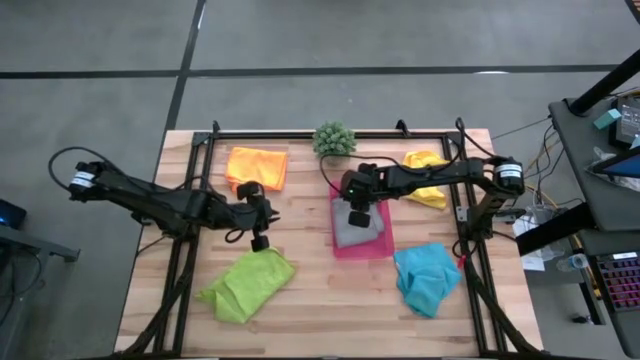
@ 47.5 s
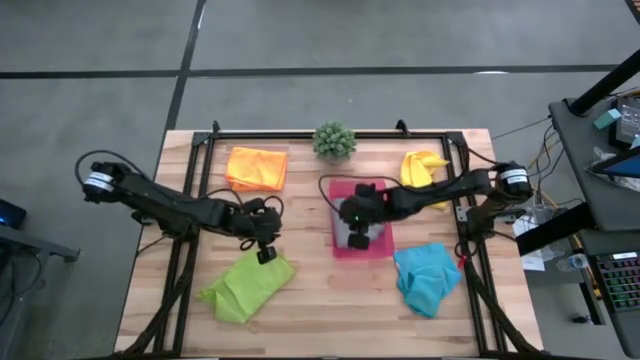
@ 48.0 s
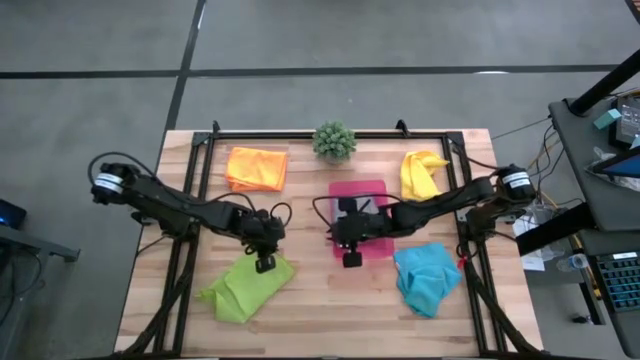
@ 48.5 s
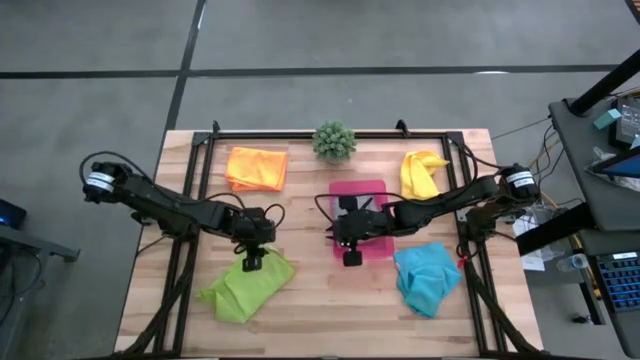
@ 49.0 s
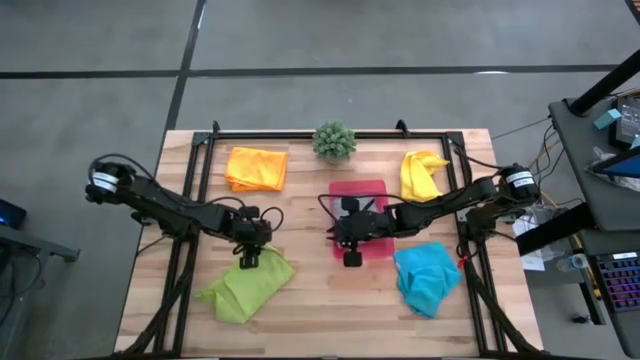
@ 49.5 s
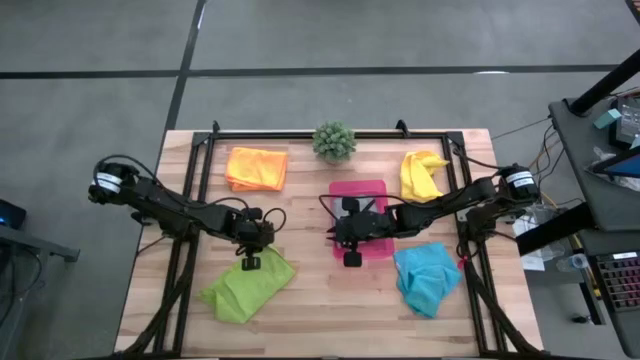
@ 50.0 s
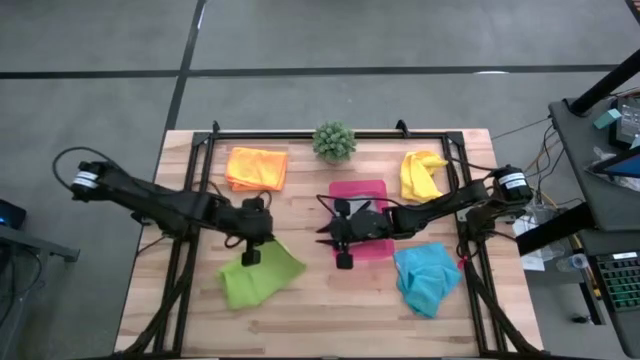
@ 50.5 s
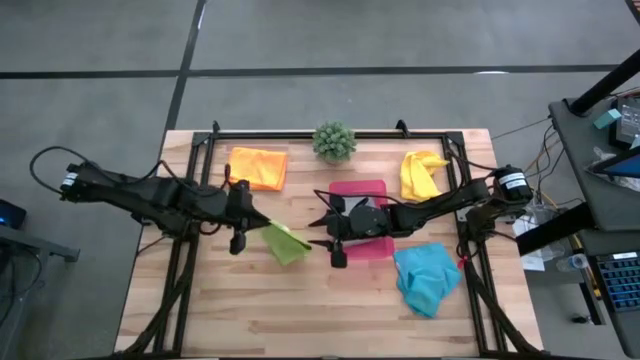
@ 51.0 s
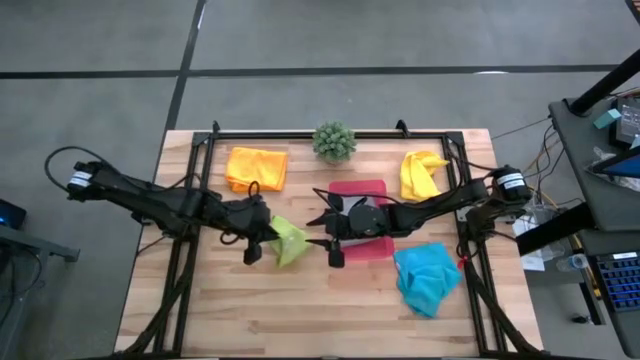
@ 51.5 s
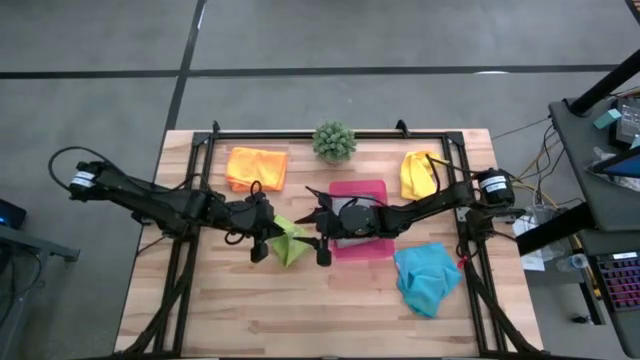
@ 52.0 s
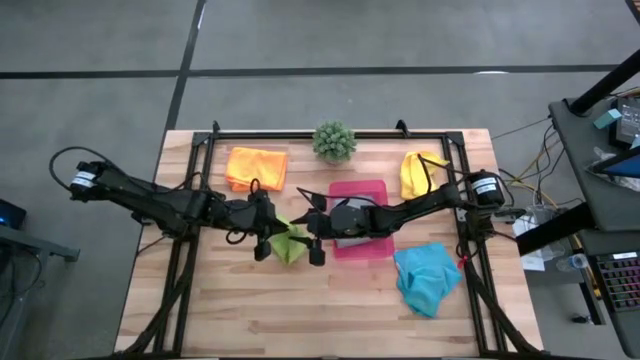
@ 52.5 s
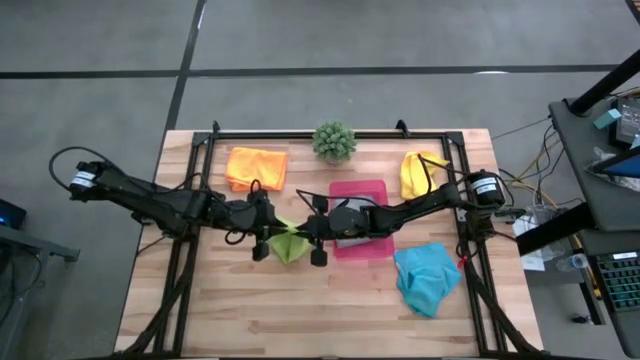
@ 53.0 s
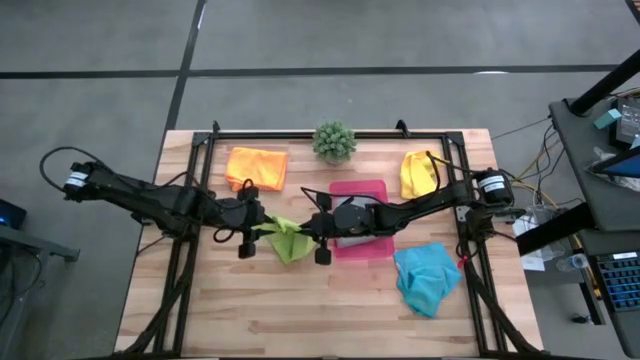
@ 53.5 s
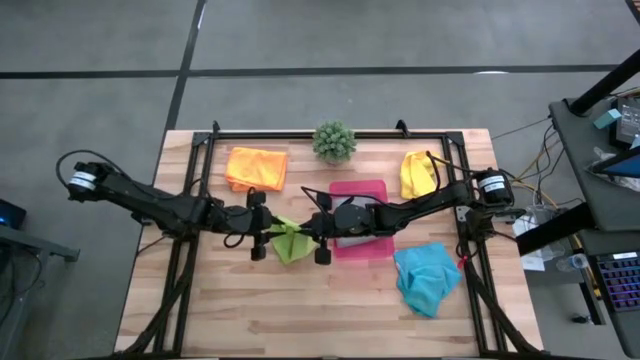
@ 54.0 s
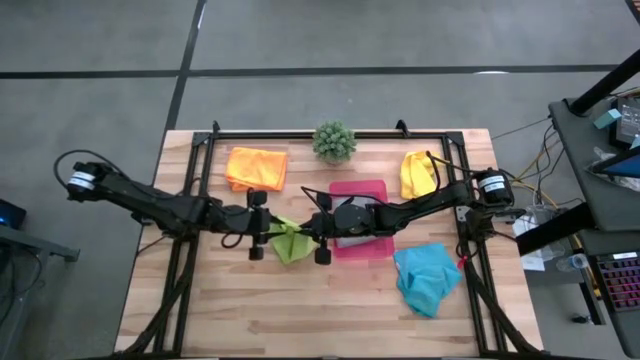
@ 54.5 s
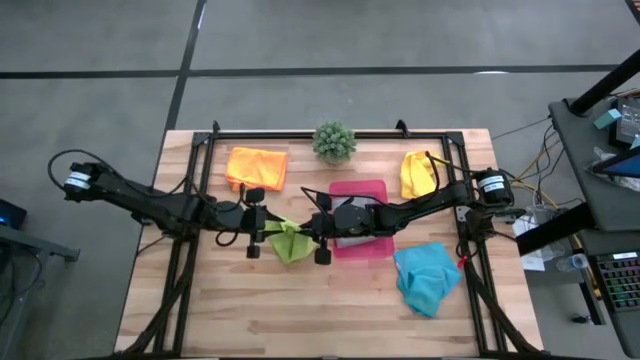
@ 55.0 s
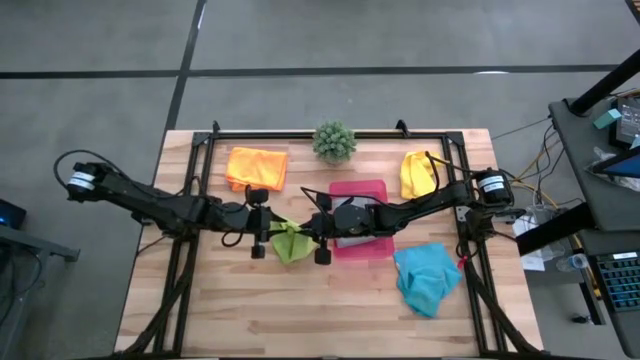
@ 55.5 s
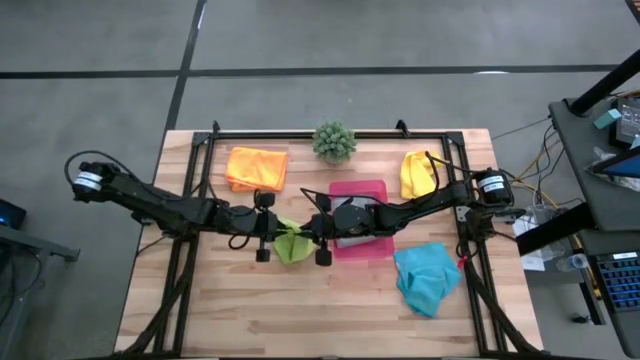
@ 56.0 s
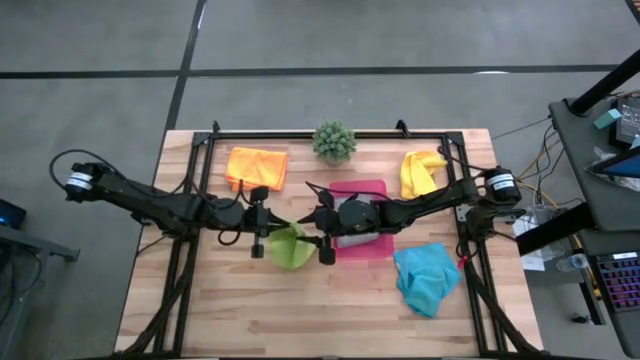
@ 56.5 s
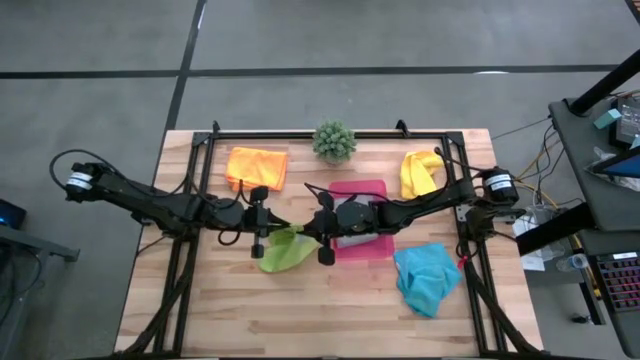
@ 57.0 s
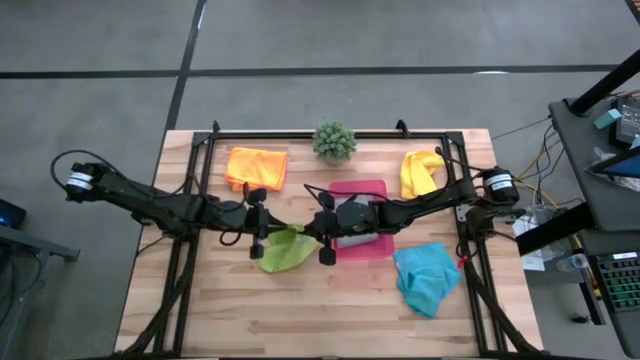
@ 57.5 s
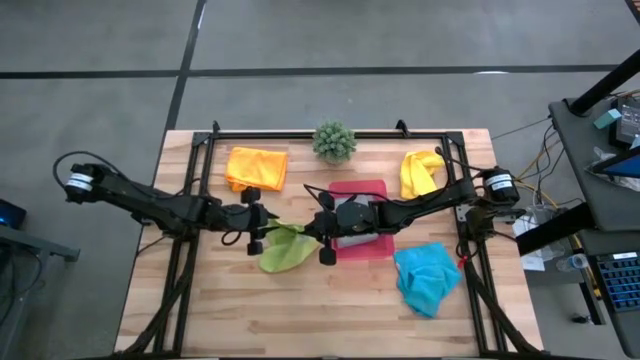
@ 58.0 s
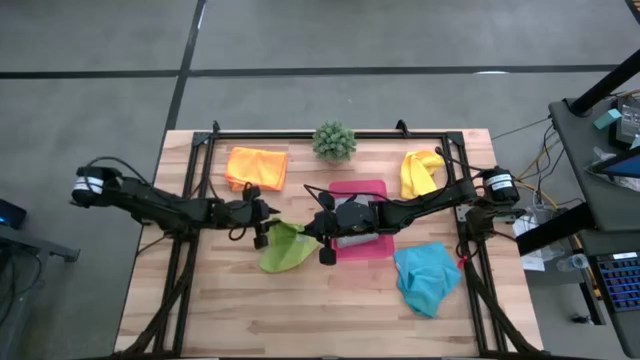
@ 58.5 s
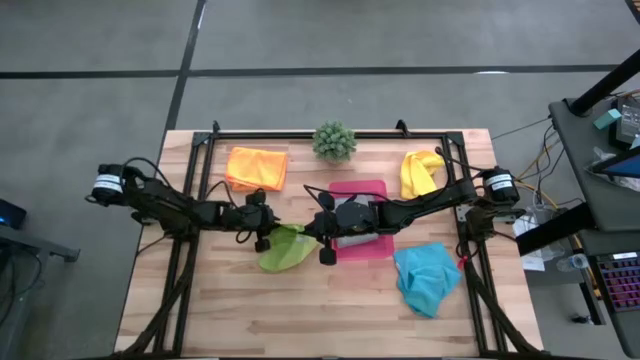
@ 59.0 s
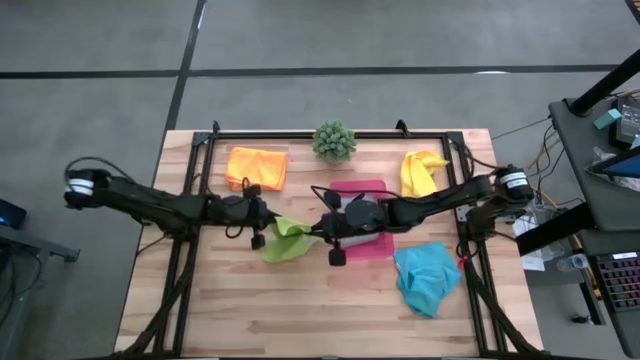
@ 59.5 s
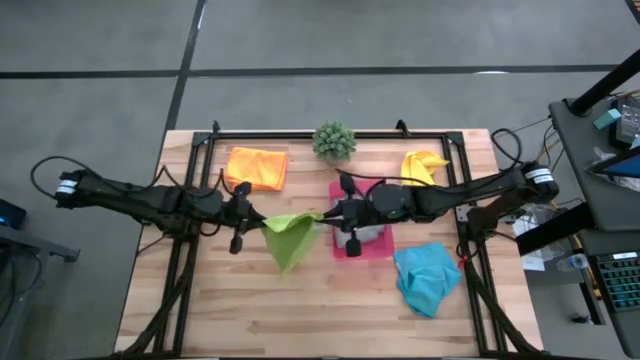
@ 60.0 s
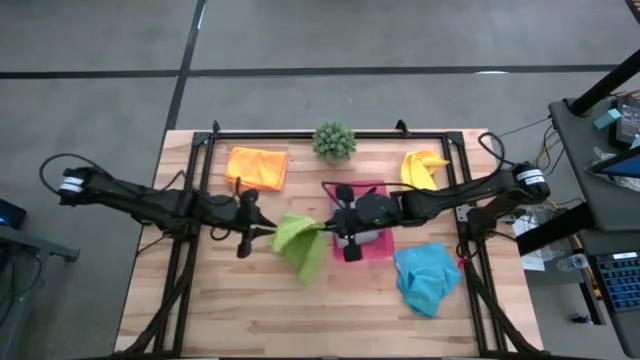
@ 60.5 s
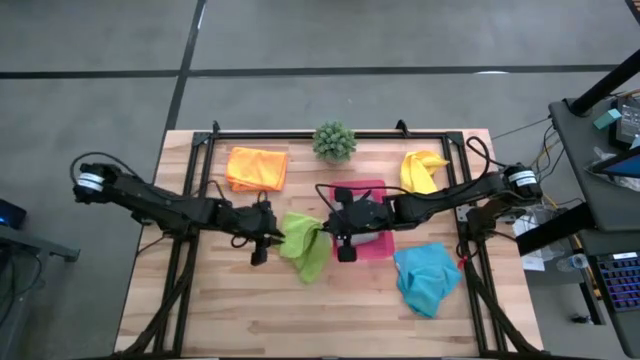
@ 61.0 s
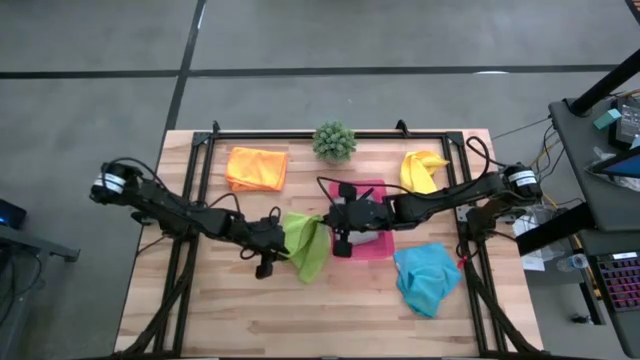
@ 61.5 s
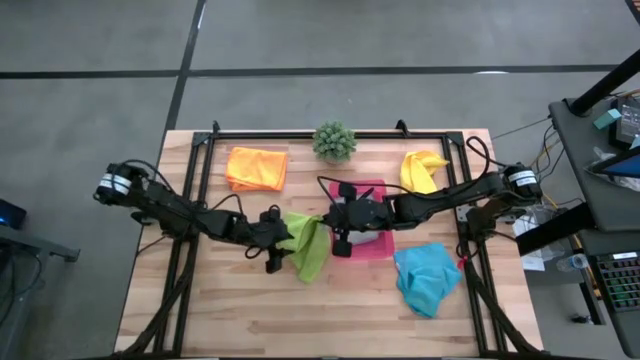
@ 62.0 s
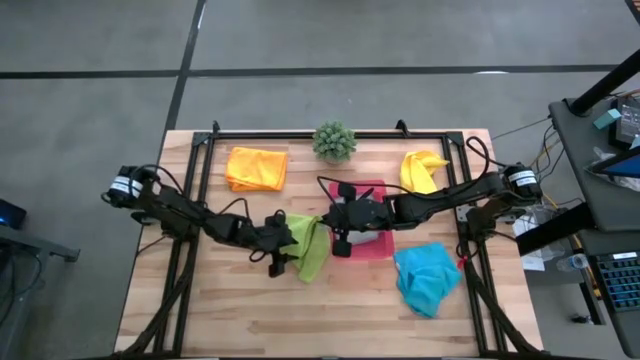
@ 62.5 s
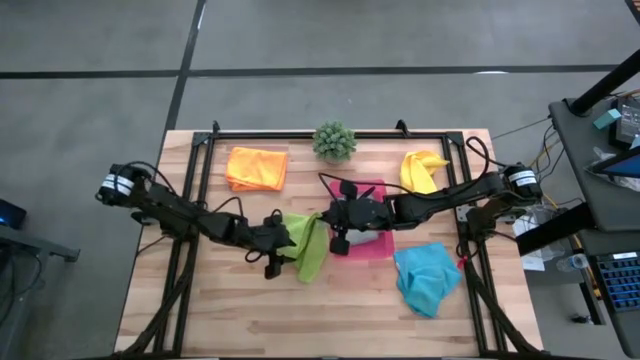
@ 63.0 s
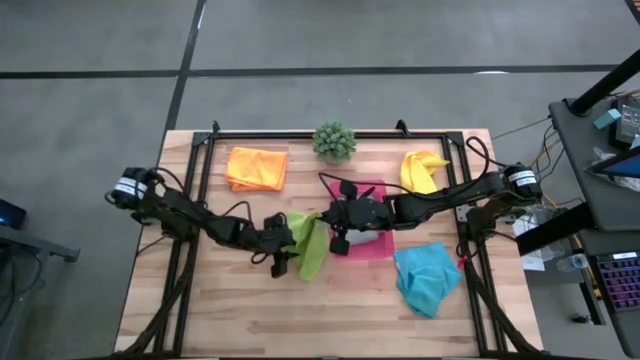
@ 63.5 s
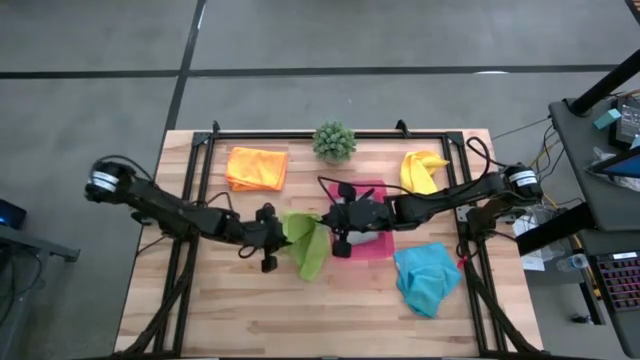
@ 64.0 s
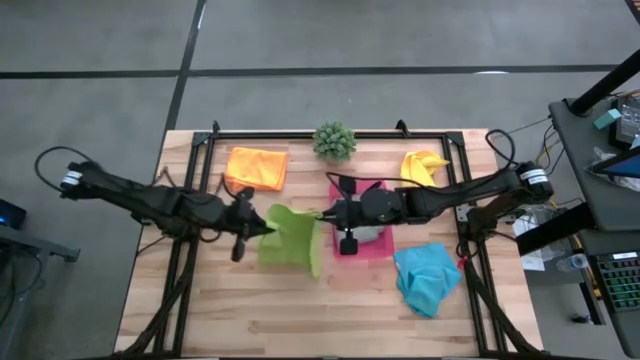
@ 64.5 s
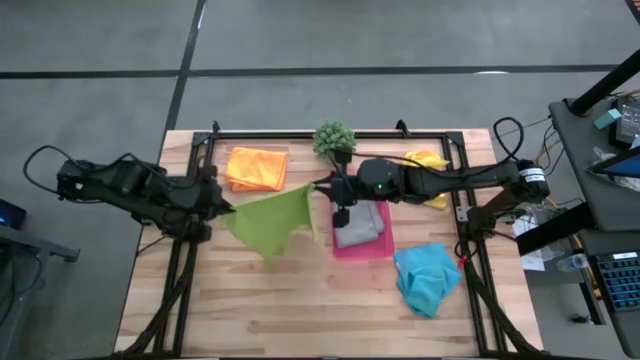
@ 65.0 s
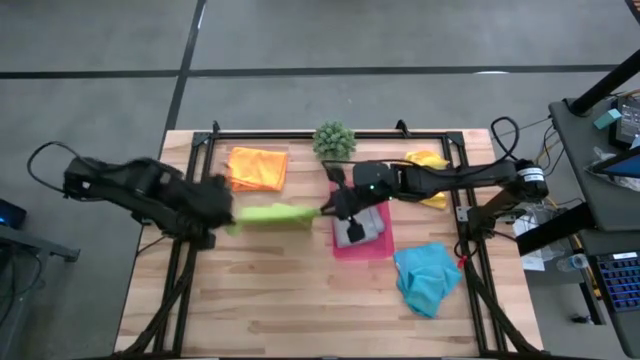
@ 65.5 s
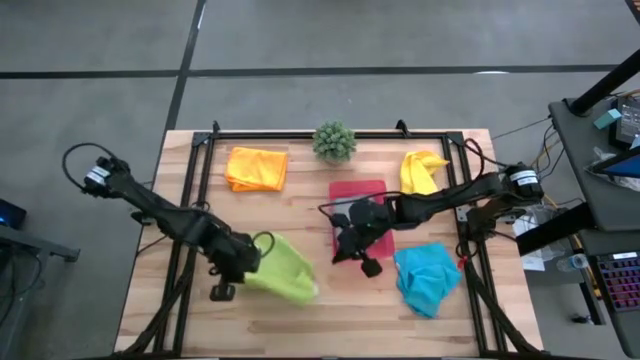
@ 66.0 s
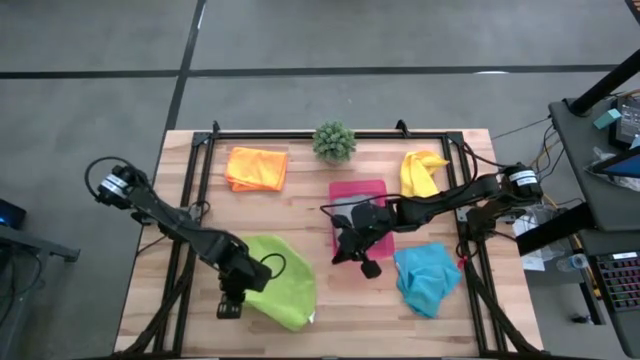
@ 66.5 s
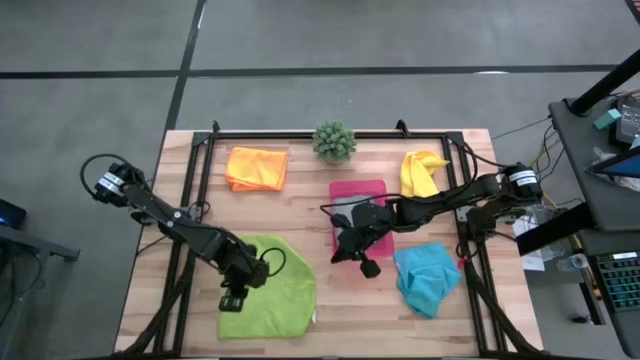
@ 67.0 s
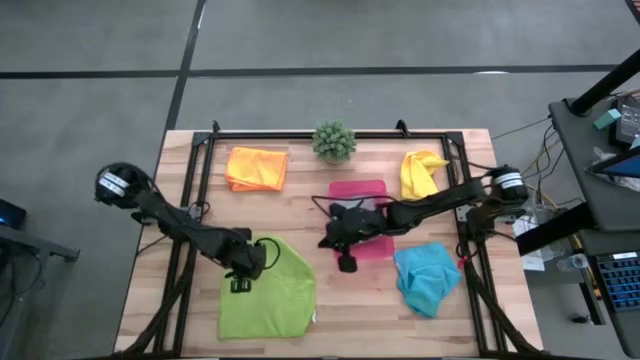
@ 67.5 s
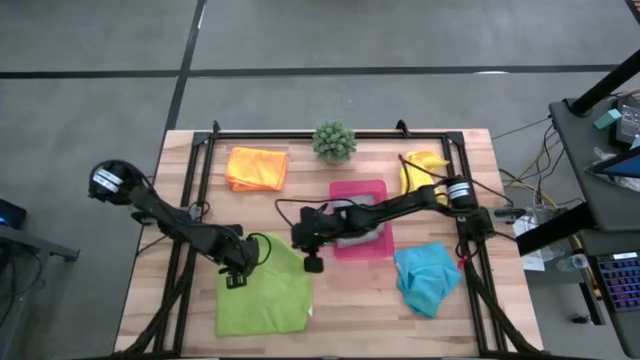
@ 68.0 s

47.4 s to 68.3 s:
Task: Fold microfiber towels
Fold the green towel

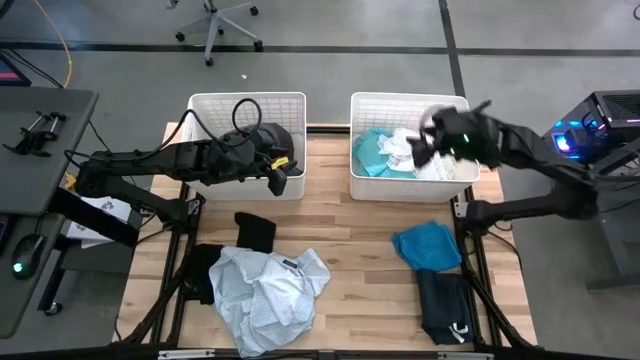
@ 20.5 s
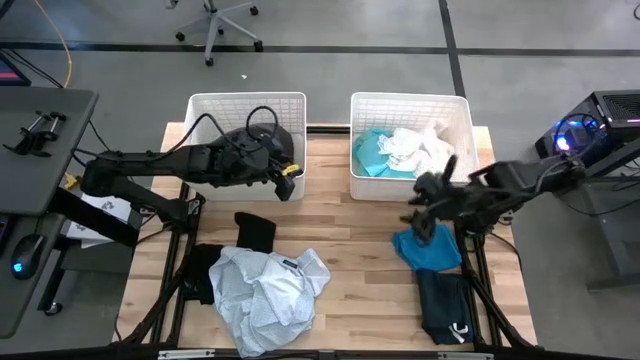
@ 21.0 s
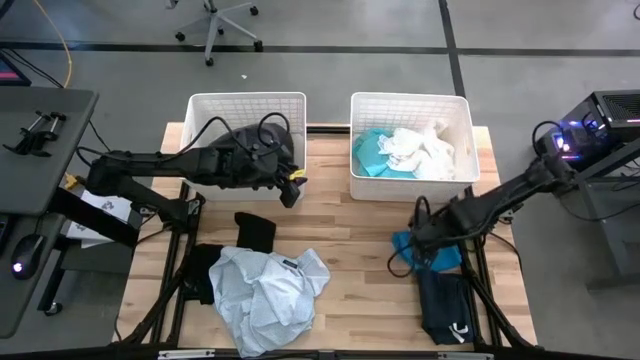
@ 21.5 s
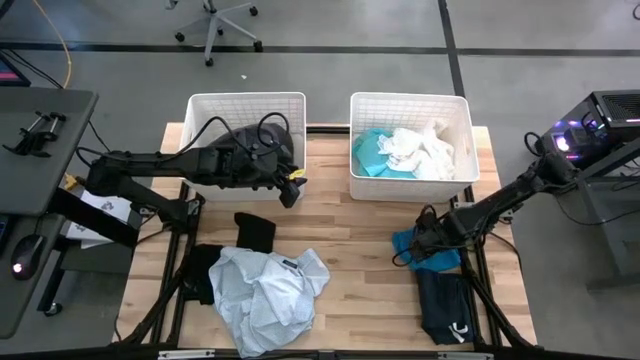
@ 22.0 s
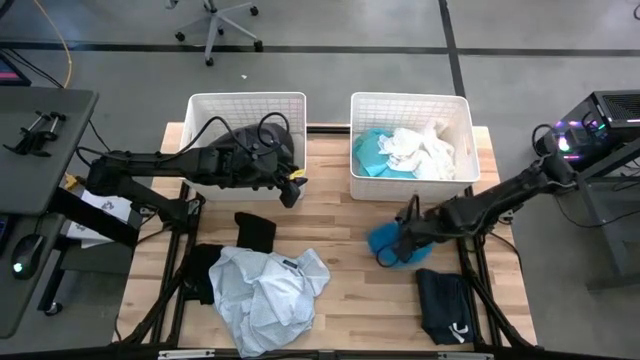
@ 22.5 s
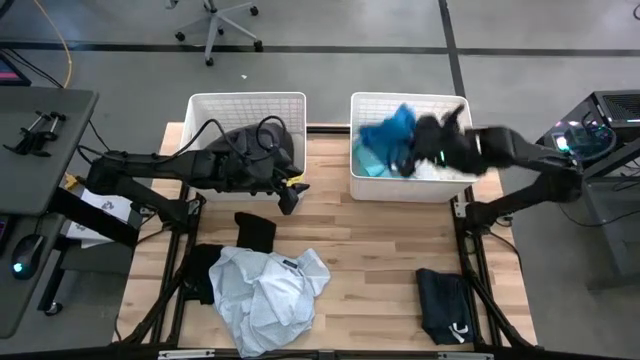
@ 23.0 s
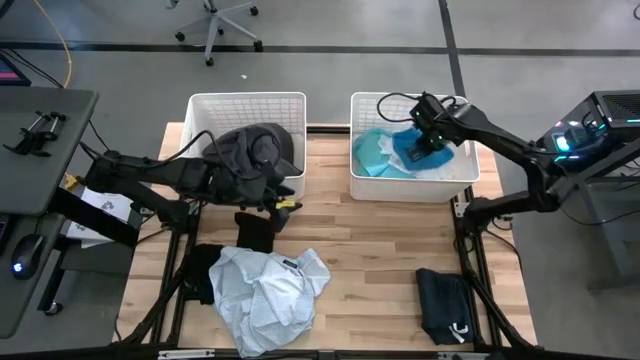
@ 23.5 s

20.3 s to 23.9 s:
Task: Sort clothes
Put the blue boxers into the right white bin
